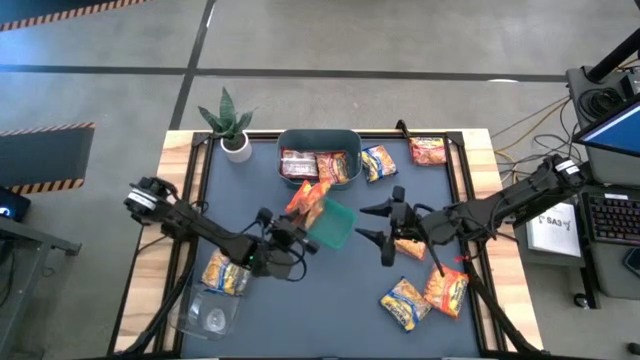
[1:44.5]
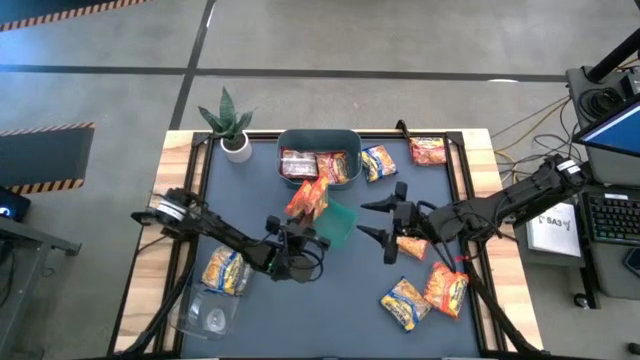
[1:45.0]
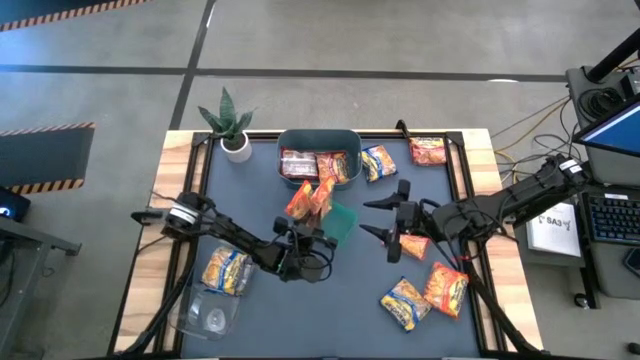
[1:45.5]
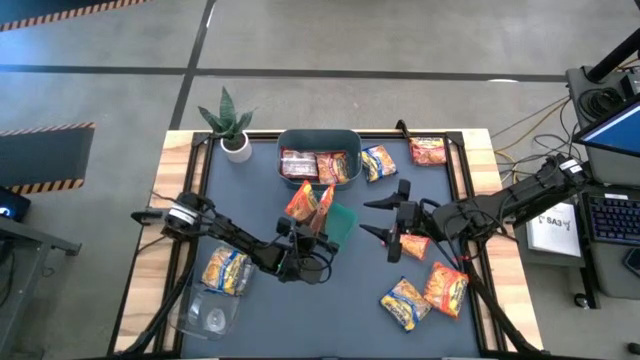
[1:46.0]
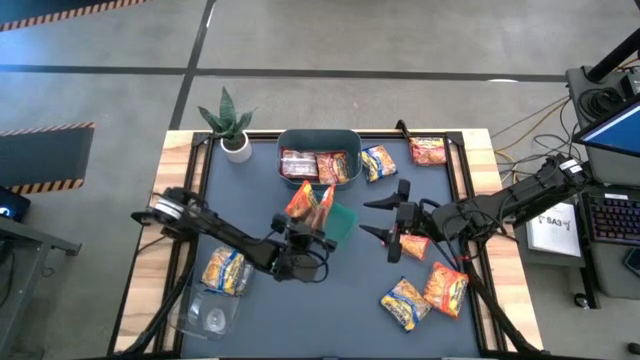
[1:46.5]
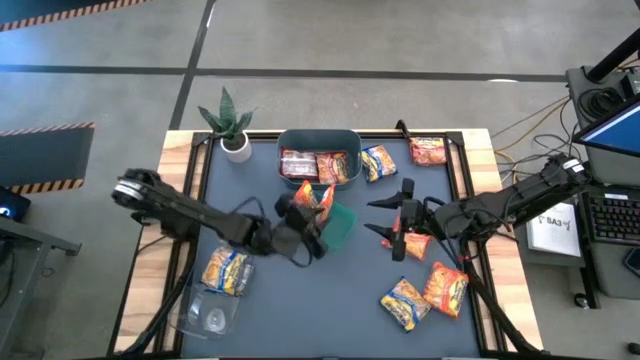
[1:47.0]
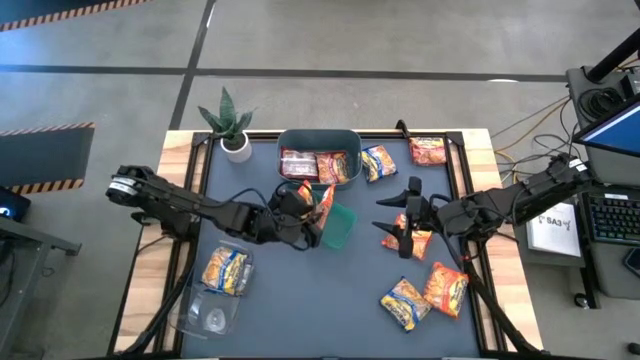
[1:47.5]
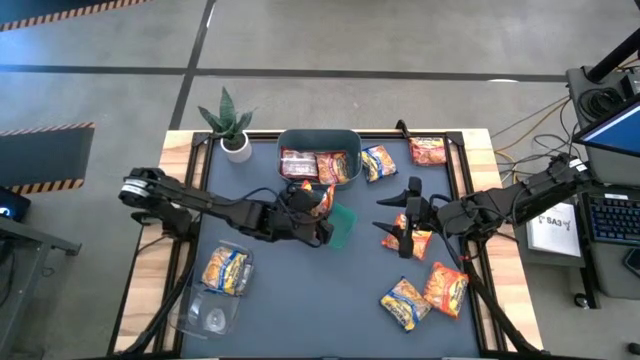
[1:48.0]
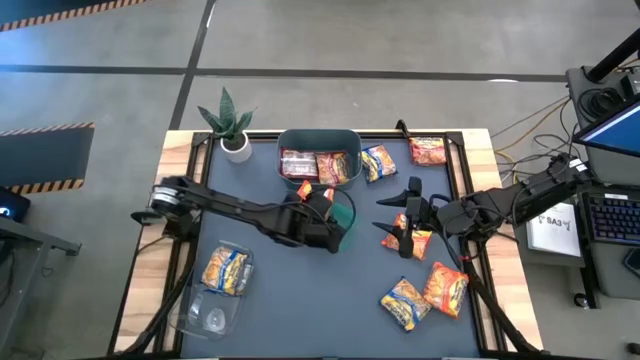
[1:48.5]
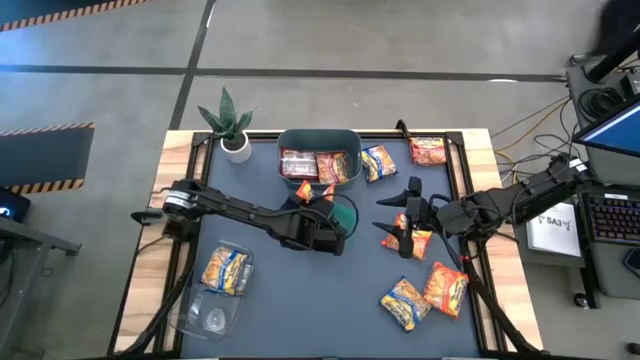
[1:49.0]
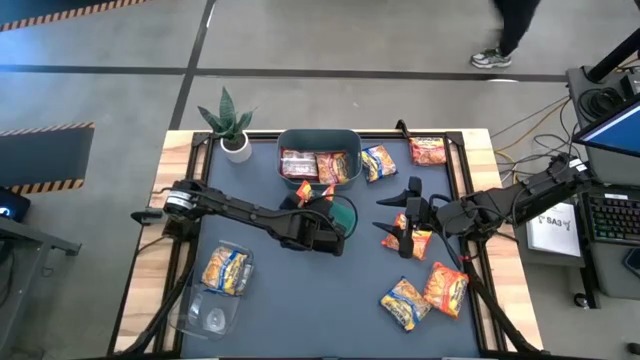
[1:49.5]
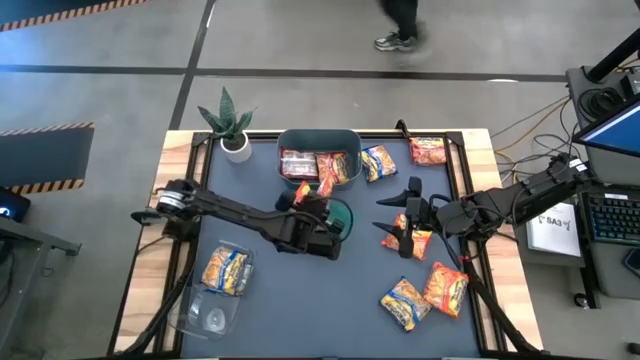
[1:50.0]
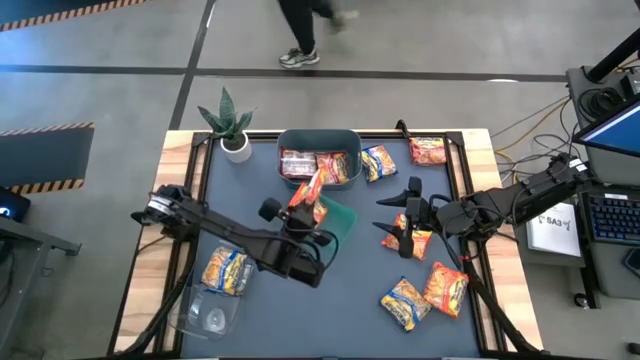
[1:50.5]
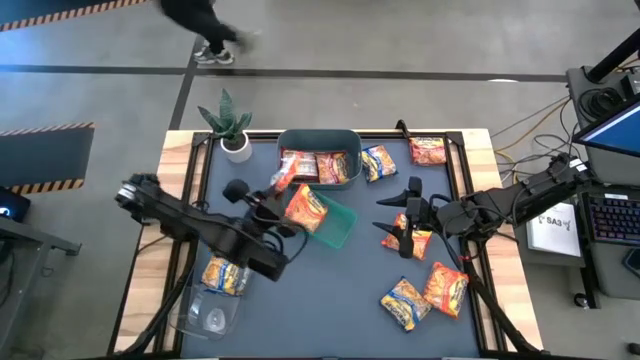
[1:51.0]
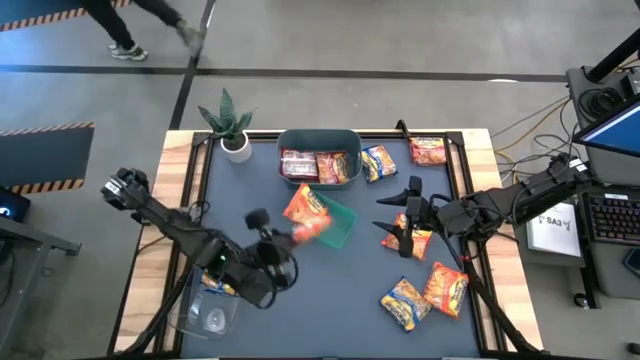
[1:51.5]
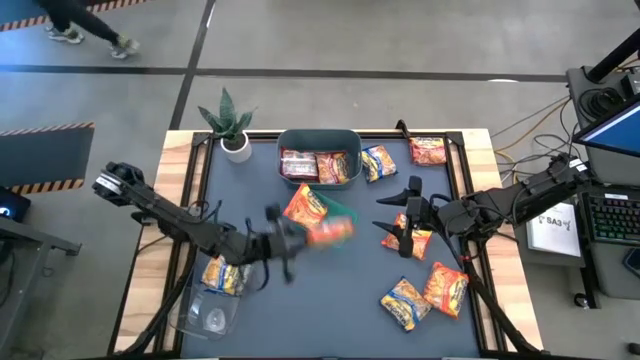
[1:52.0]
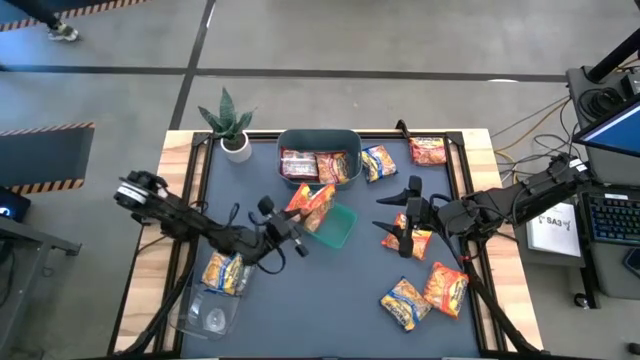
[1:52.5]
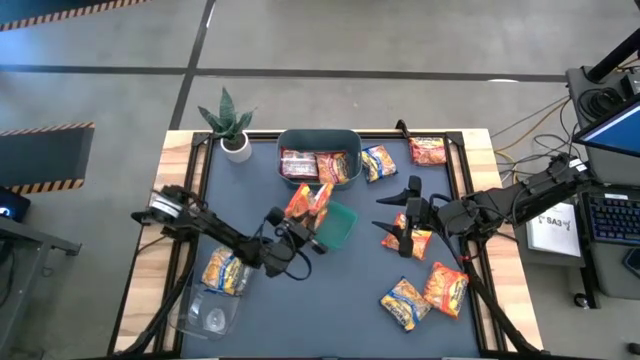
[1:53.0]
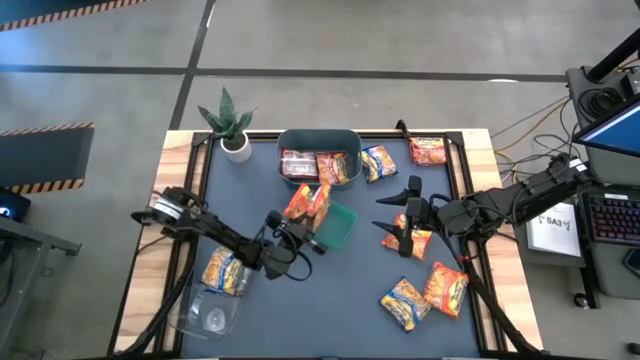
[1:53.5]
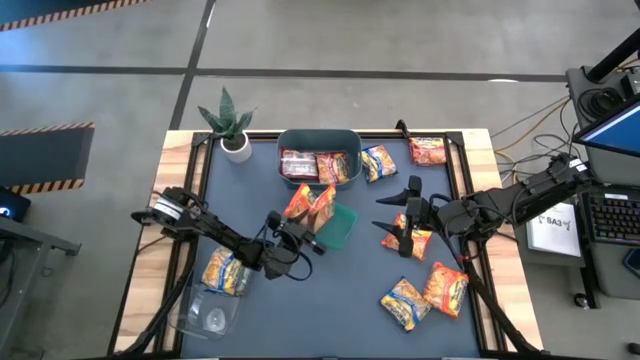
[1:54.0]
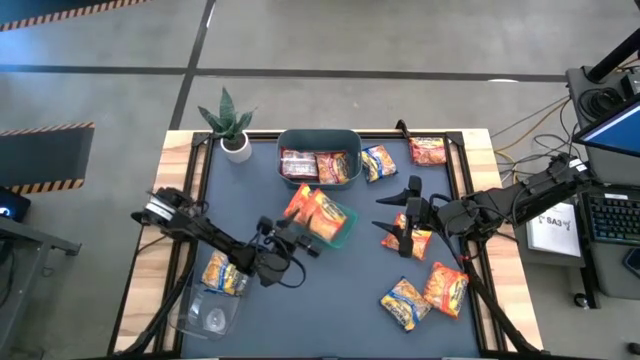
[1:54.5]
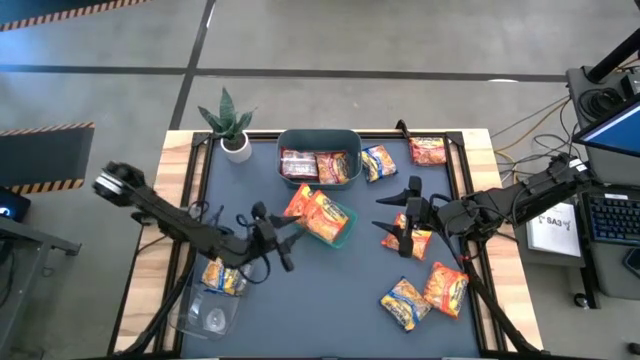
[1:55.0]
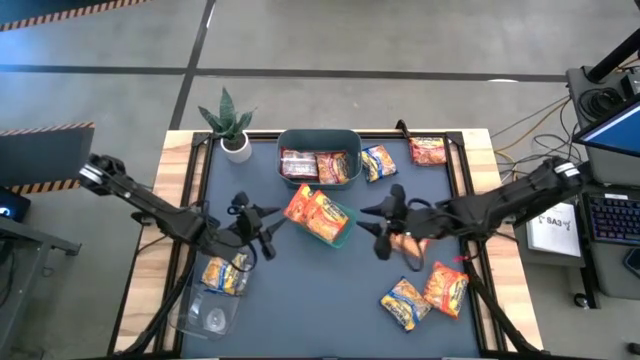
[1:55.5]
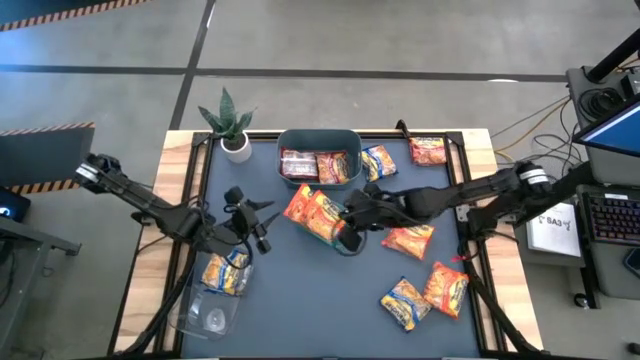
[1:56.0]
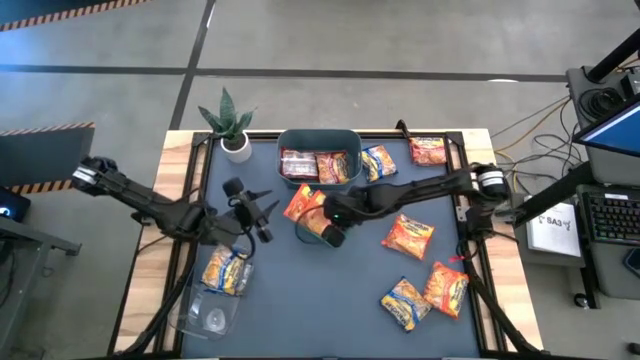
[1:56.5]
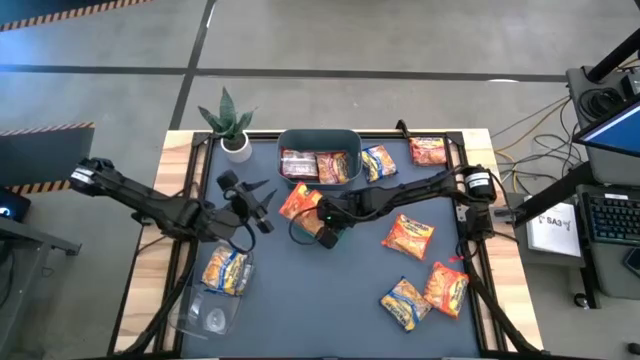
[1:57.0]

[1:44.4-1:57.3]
Task: Sort Maruchan noodles
Put the orange noodle pack into the green bin

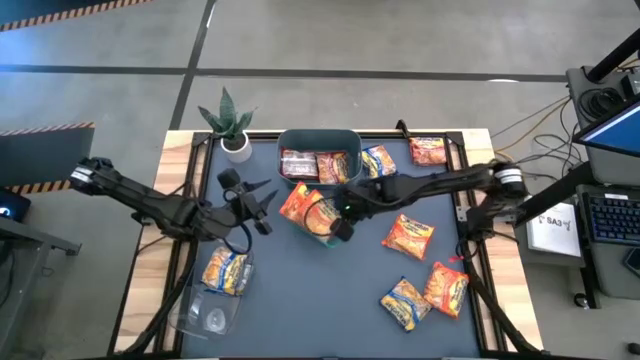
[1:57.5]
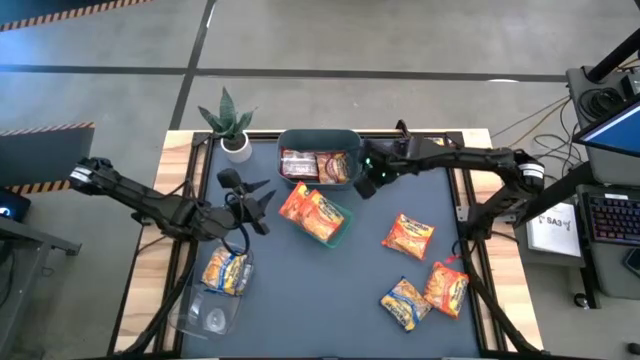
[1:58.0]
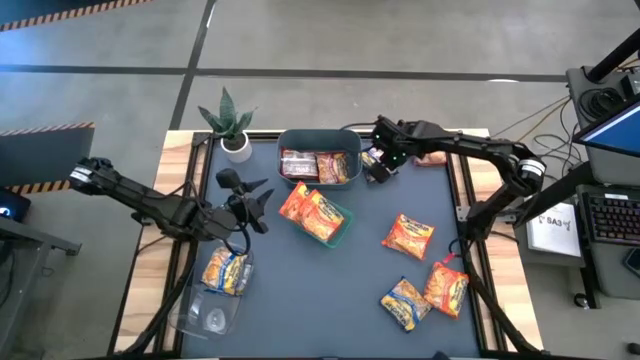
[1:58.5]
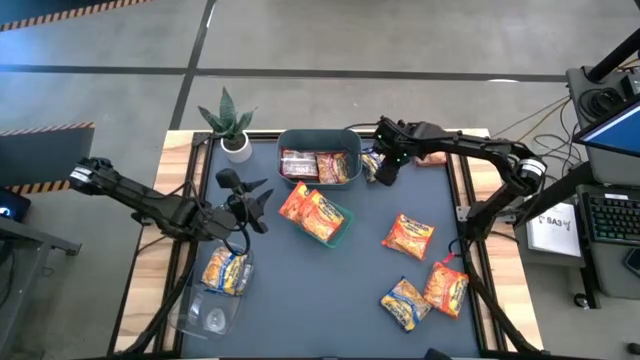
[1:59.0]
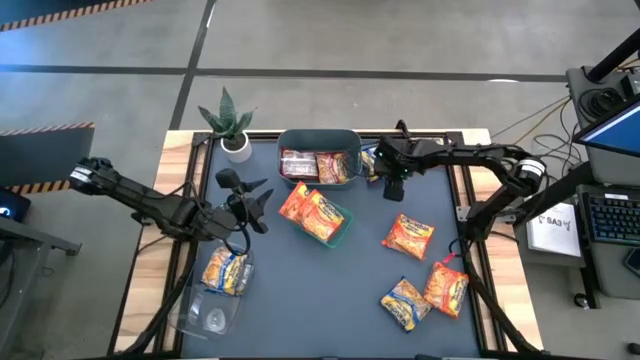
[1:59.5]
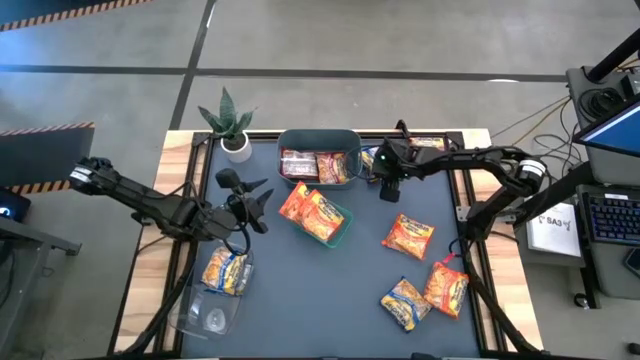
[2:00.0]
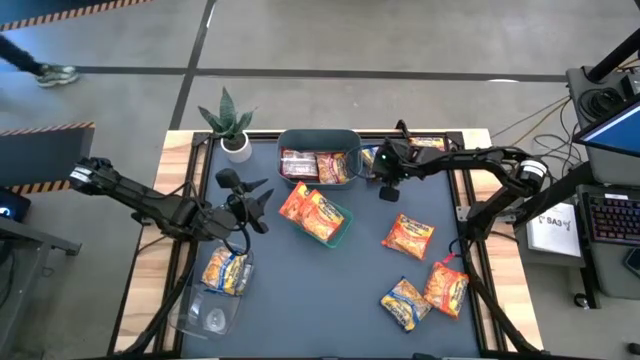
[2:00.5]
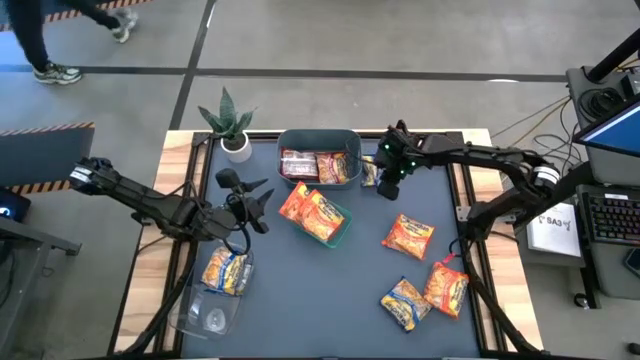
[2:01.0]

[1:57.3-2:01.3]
Put the blue noodle pack into the transparent bin

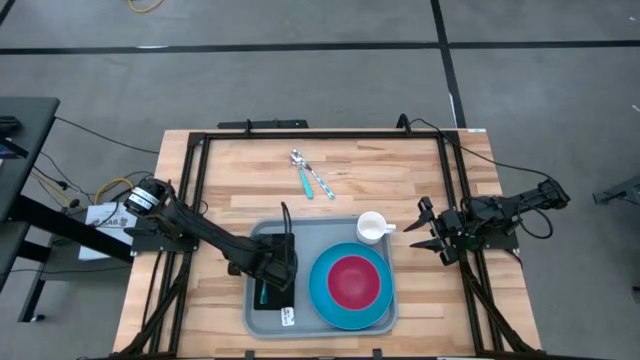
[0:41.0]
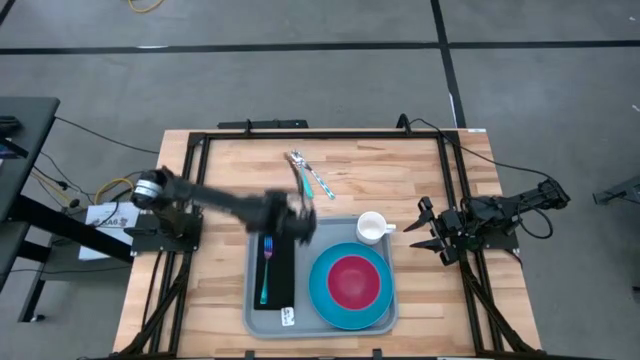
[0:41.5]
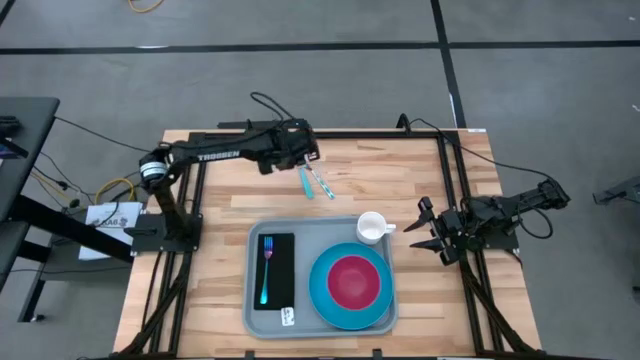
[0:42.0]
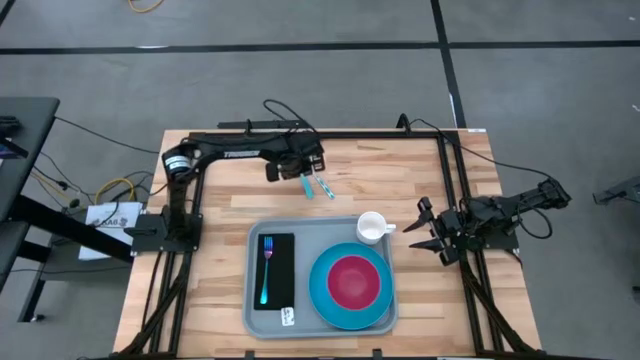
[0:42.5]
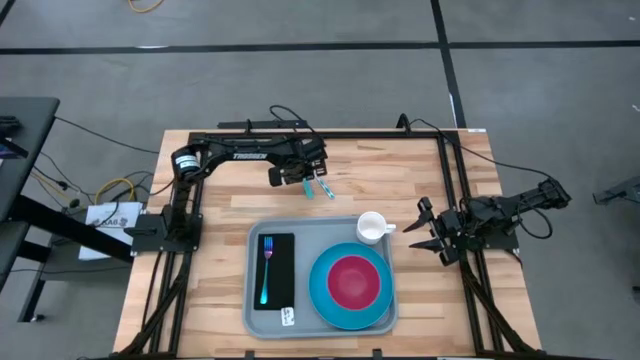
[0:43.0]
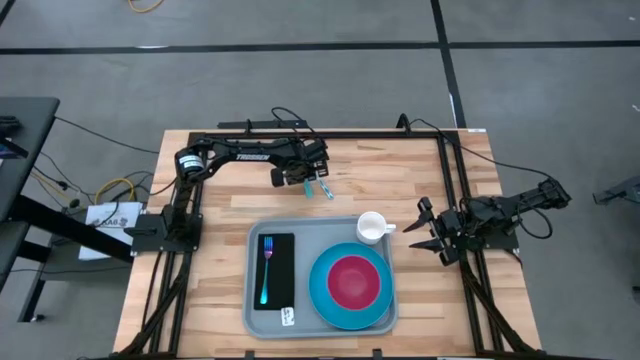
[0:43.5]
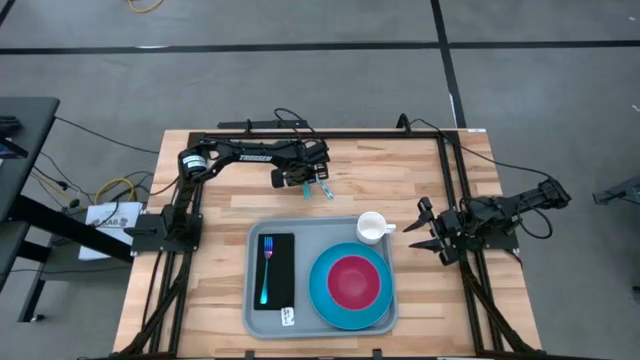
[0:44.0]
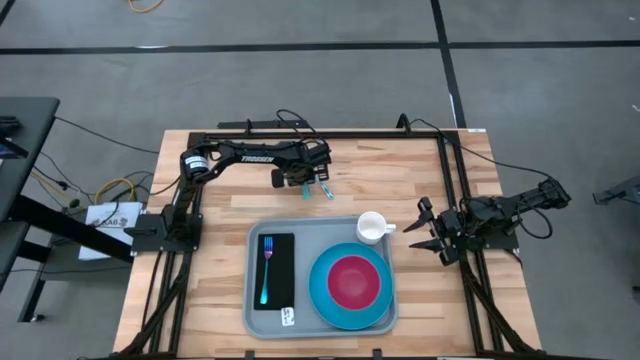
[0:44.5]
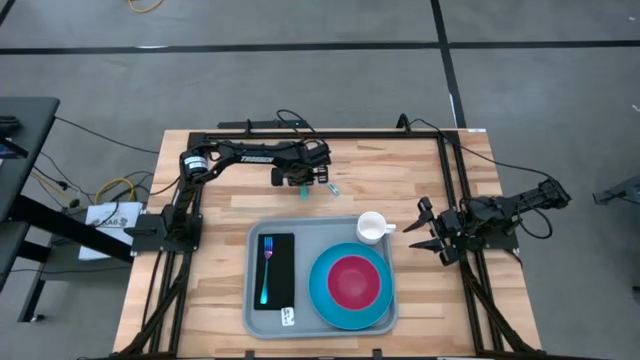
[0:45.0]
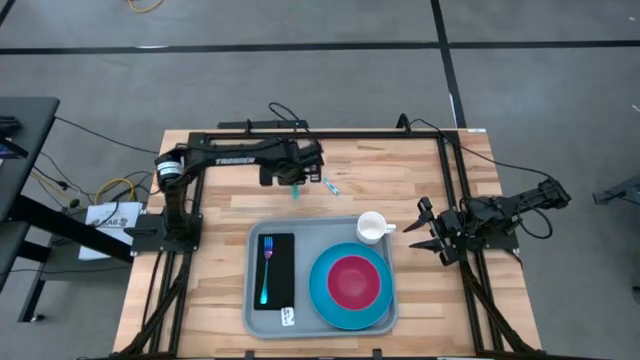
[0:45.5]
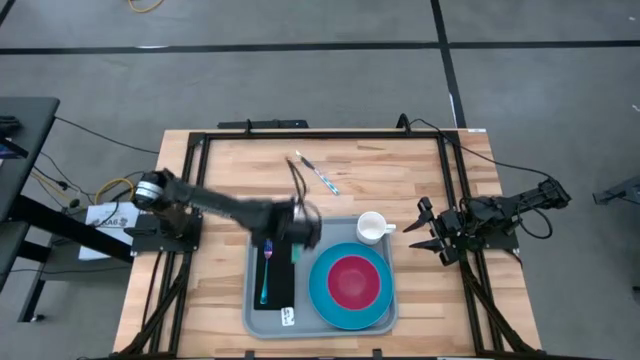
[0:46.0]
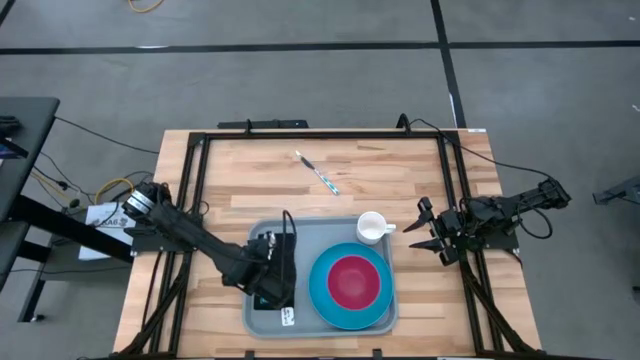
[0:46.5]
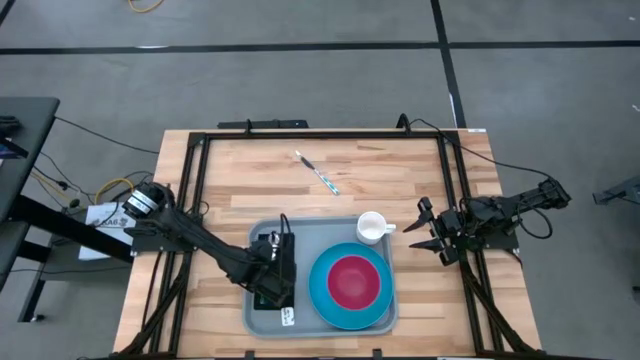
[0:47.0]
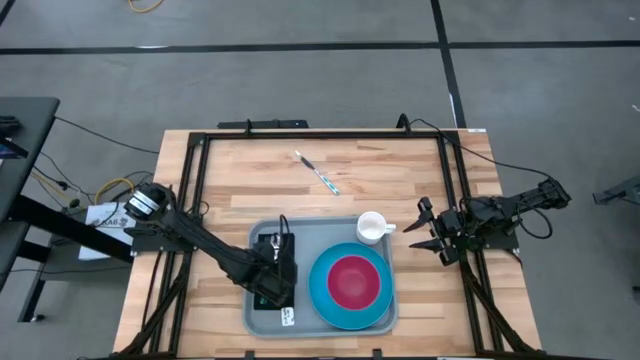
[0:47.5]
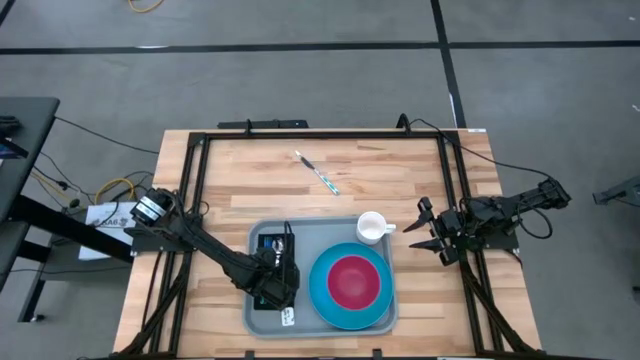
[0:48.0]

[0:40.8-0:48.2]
Task: Set up tray
Put the blue spoon on the black table napkin to the right of the fork
